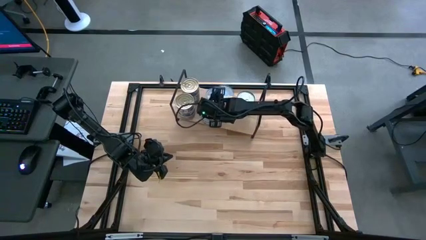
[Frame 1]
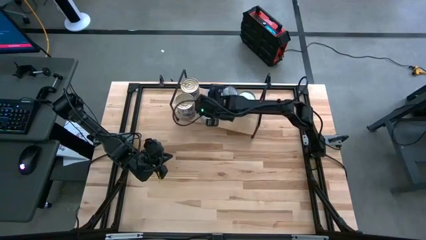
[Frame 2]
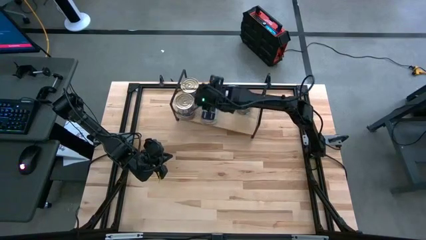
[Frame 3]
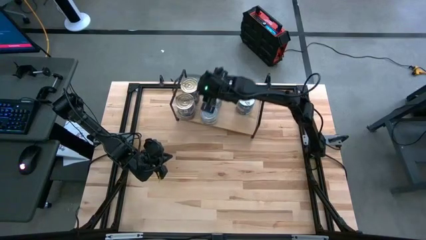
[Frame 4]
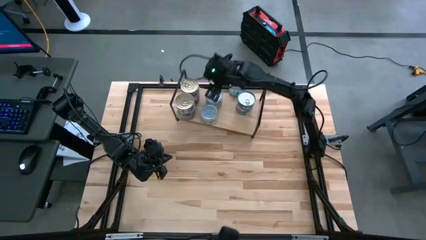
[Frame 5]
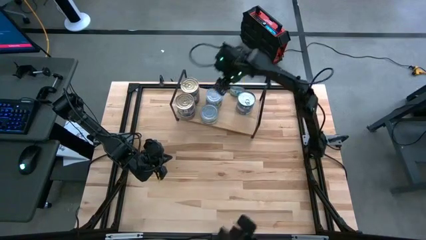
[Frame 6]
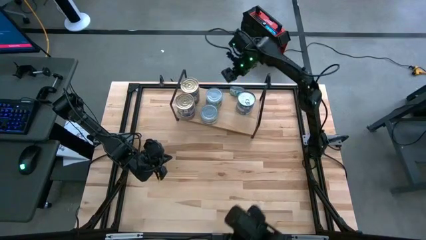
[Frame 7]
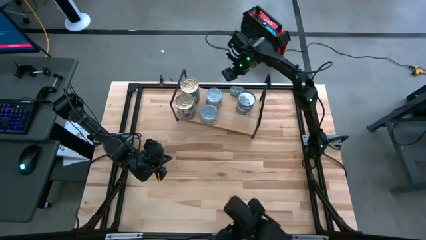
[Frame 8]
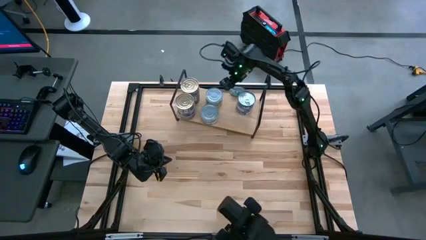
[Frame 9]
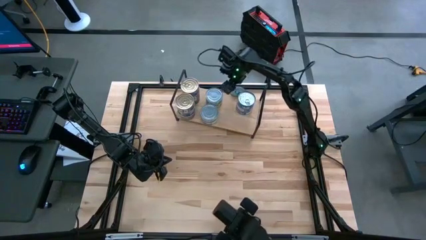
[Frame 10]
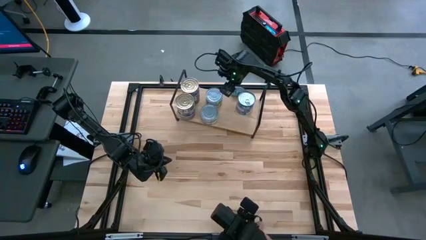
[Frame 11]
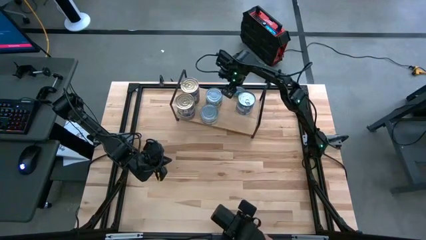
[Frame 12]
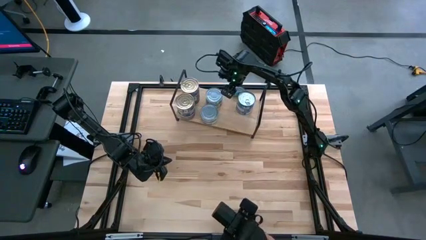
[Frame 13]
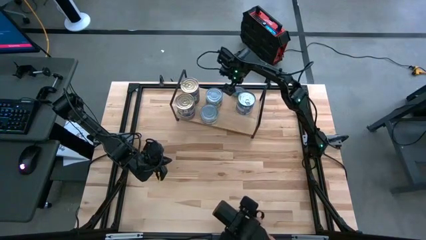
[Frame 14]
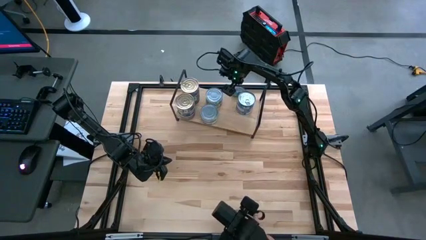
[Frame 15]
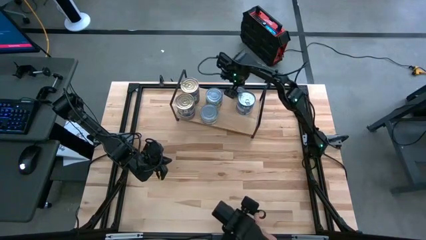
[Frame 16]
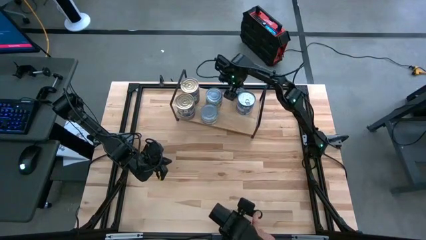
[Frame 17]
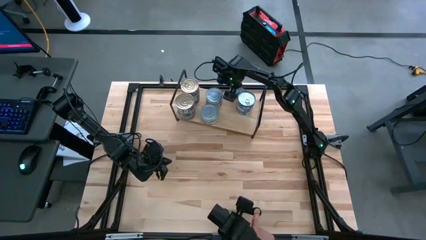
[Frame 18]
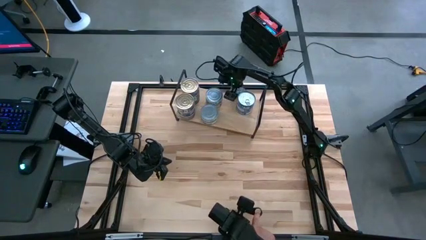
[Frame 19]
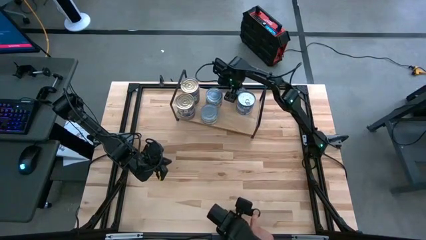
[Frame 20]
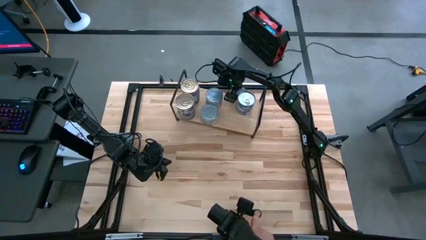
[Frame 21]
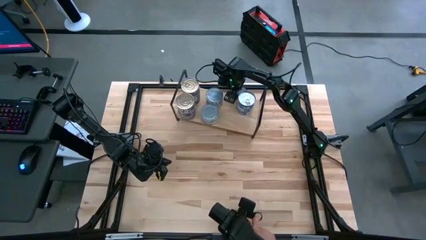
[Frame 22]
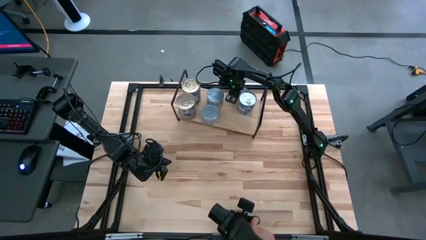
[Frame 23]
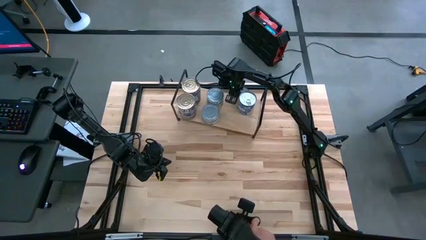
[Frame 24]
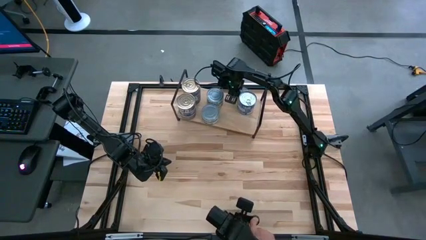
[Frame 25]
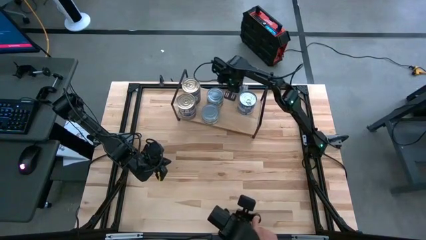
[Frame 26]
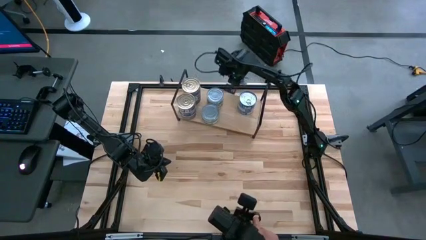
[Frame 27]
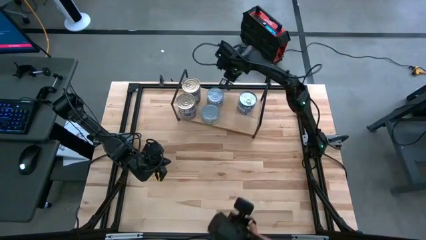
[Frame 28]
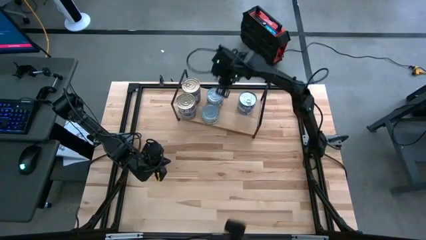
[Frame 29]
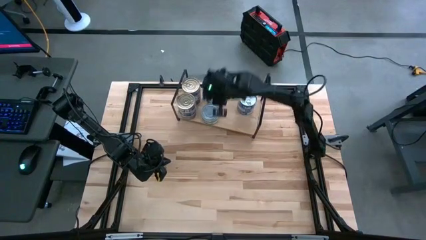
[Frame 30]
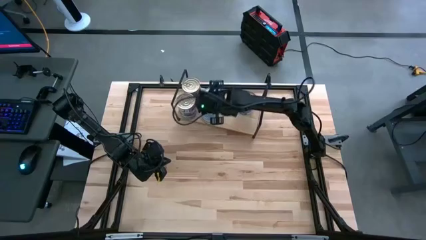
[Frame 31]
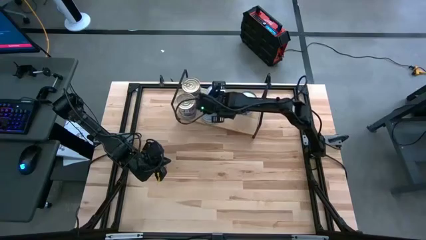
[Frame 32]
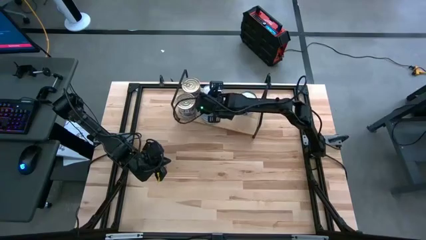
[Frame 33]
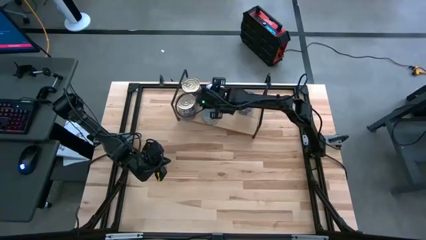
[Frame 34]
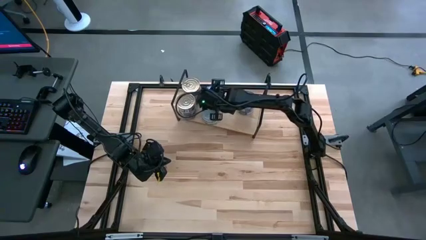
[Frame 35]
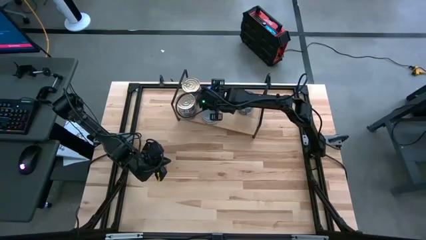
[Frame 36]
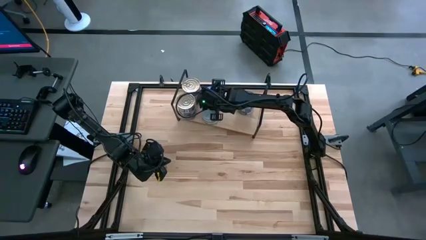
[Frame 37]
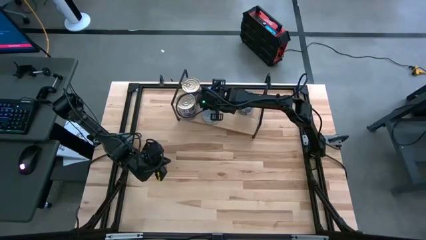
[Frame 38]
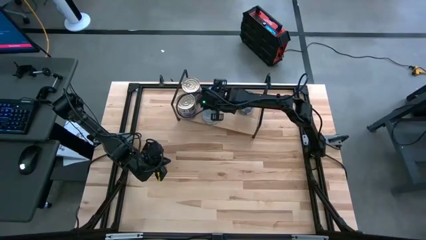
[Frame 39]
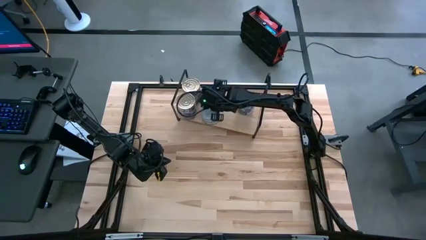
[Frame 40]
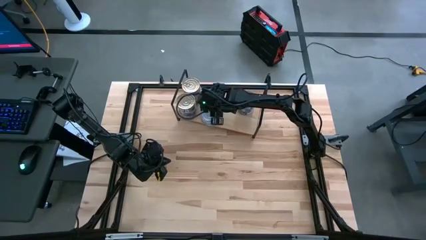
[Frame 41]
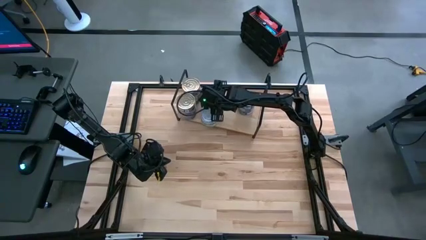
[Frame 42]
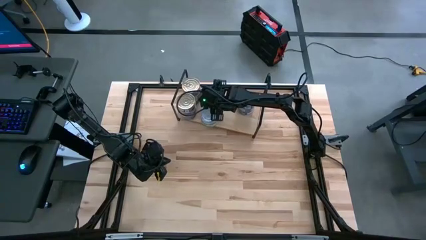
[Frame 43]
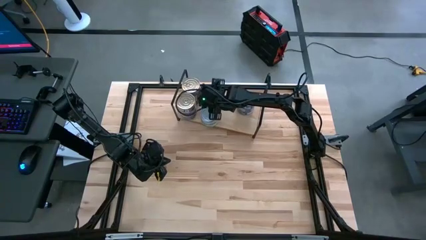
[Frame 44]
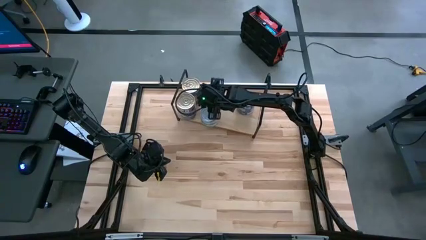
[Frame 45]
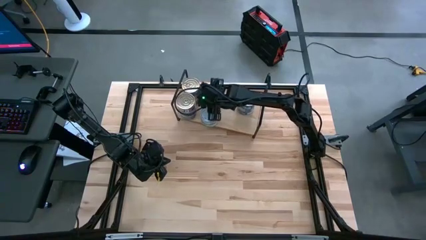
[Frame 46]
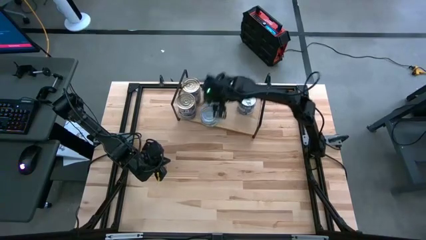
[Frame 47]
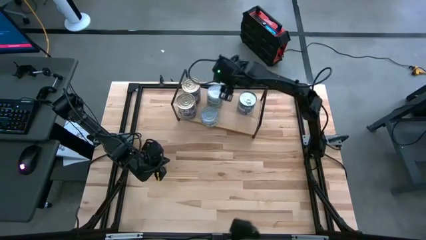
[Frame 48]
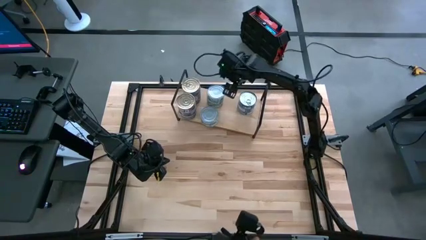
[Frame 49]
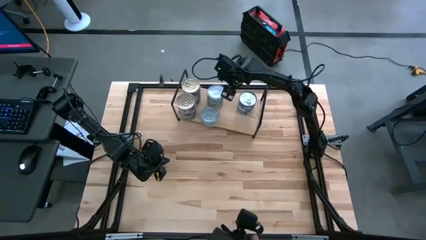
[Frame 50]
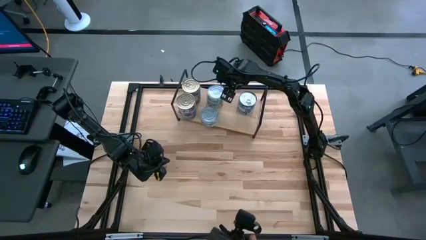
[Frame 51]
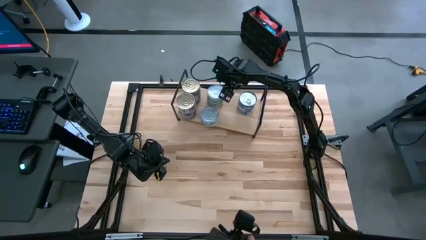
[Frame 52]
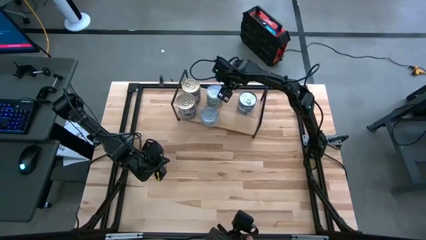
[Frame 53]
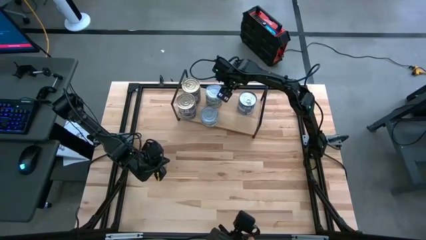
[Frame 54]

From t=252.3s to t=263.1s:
Task: Stack canned seafood by type on shelf
Stack the green white tuna can on top of the other green white tuna cans on the shelf

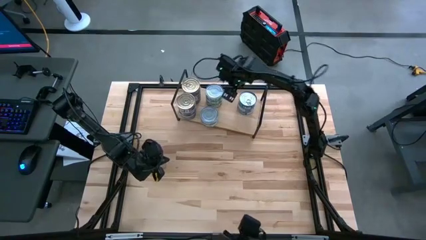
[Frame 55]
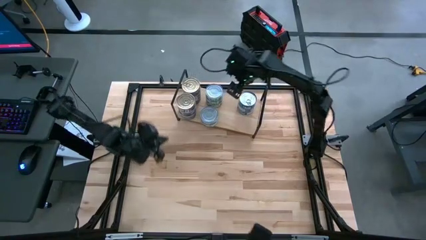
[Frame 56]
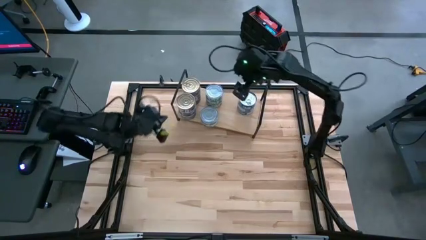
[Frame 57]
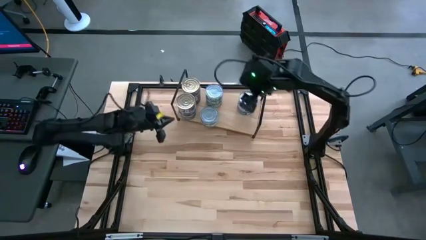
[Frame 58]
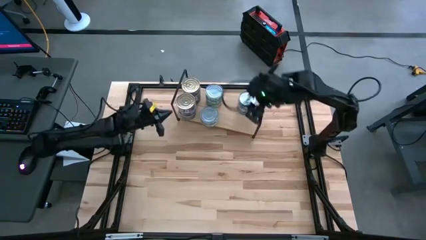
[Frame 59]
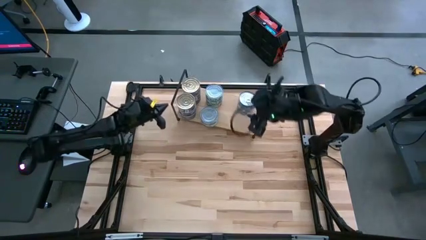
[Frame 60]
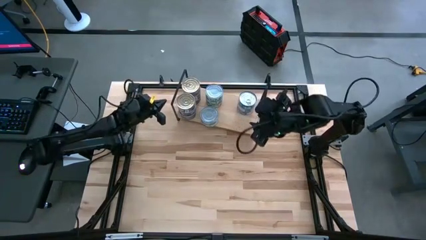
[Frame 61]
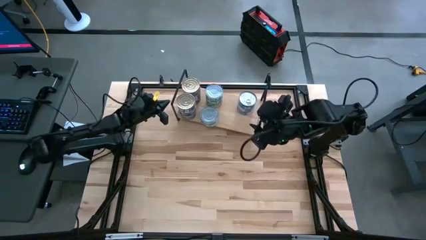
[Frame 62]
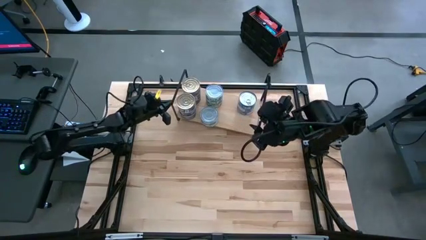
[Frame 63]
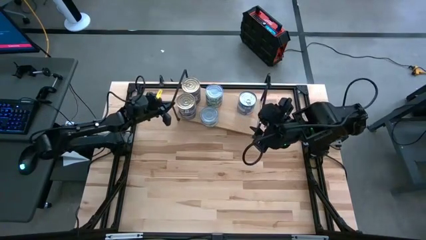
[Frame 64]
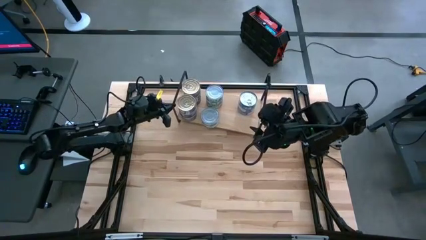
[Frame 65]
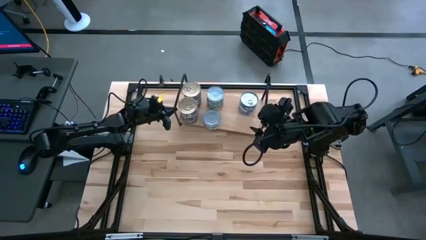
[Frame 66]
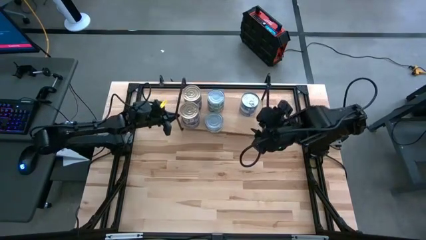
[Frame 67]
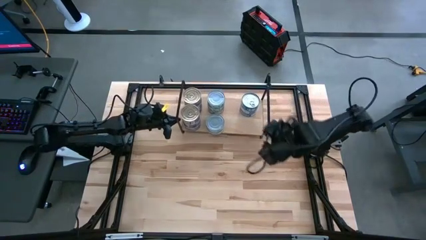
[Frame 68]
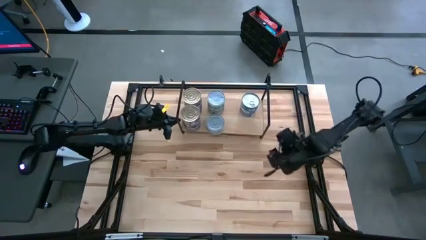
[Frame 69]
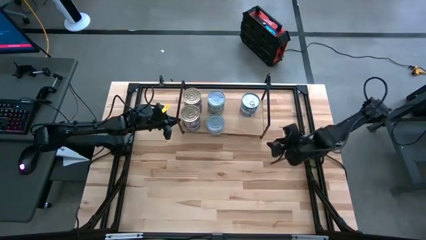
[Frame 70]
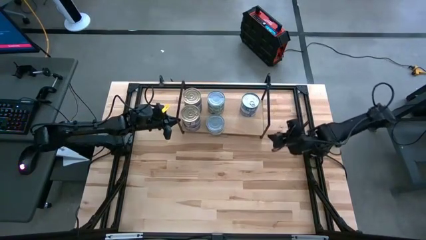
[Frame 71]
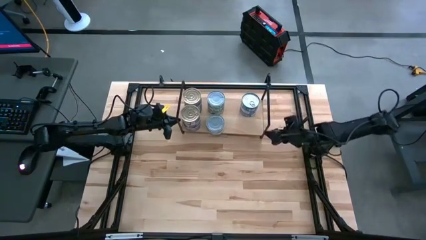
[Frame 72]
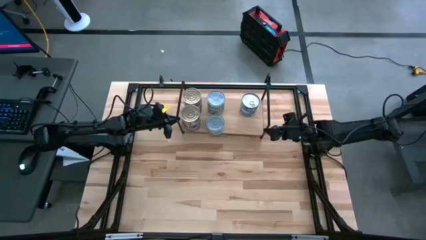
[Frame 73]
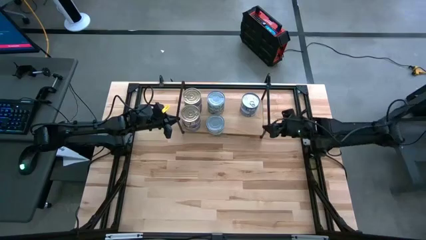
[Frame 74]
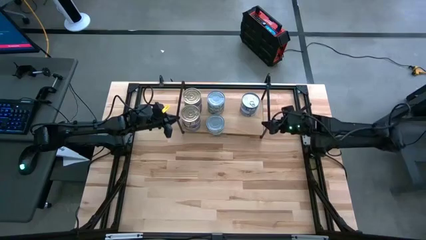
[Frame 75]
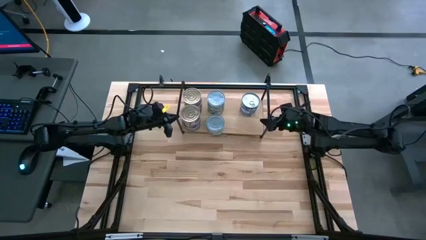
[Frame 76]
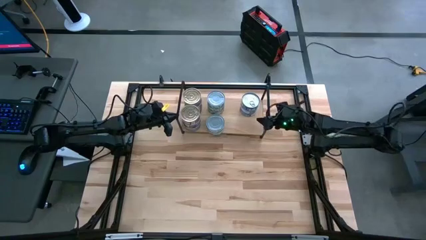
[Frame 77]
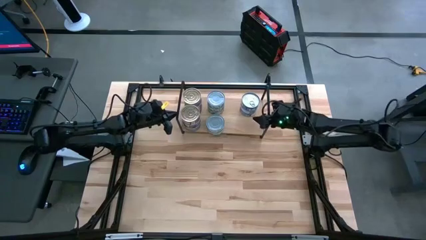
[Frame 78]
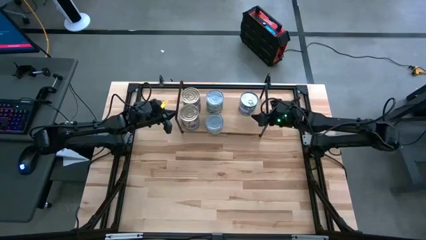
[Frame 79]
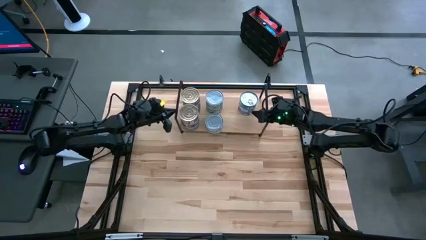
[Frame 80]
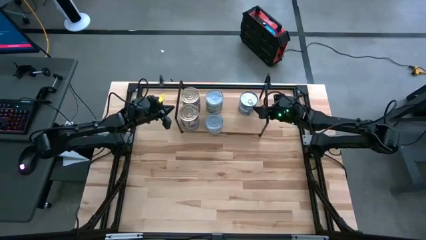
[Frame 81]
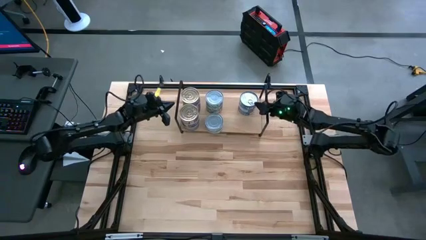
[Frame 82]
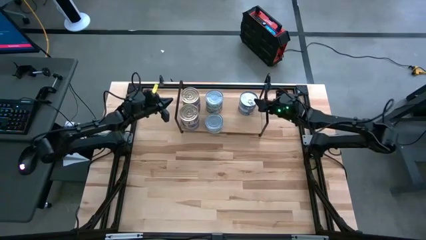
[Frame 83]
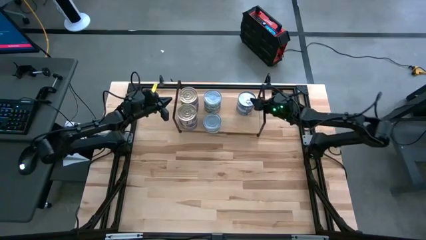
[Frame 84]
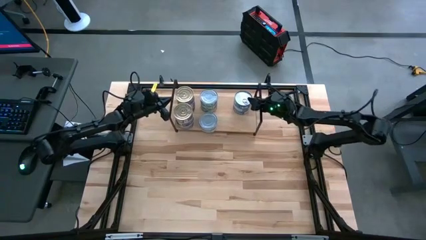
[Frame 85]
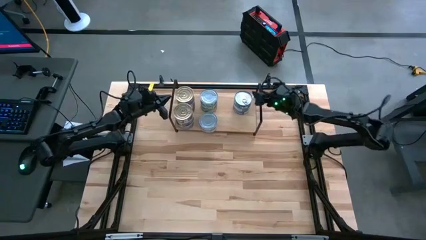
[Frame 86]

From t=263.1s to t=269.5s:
Adjust the shelf
